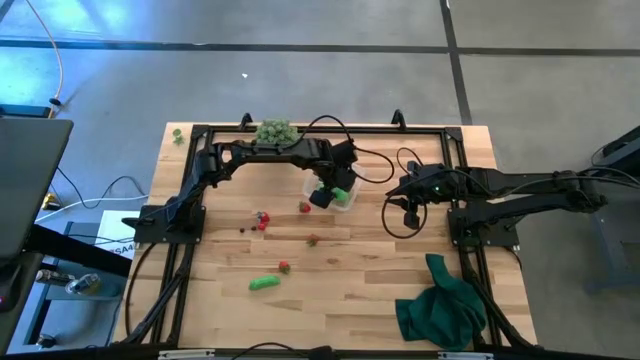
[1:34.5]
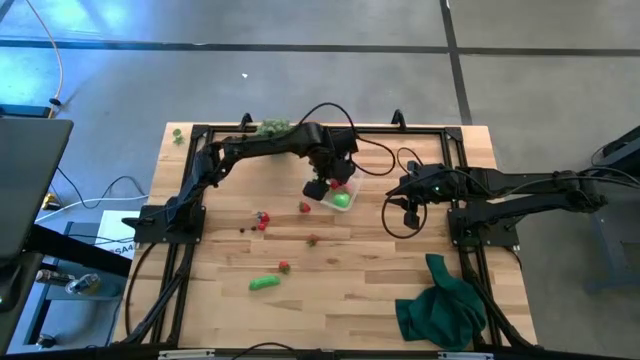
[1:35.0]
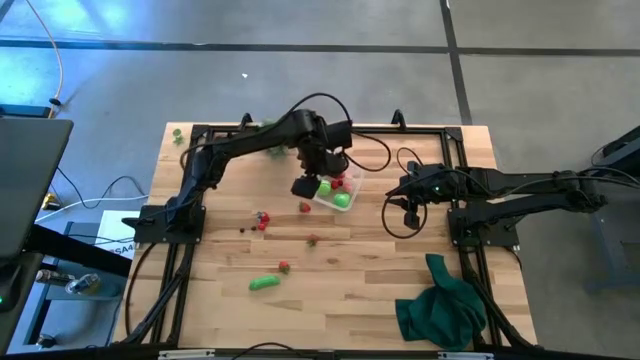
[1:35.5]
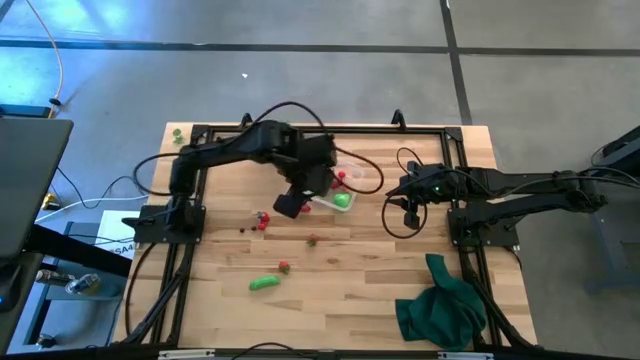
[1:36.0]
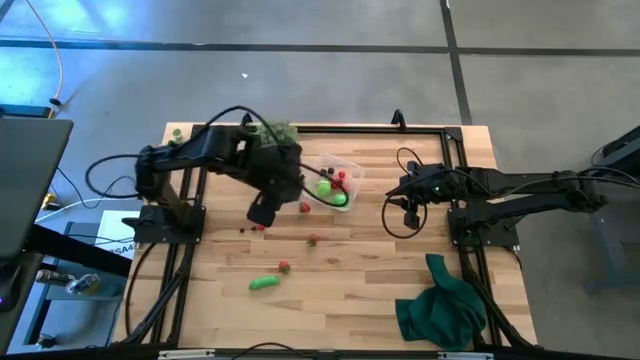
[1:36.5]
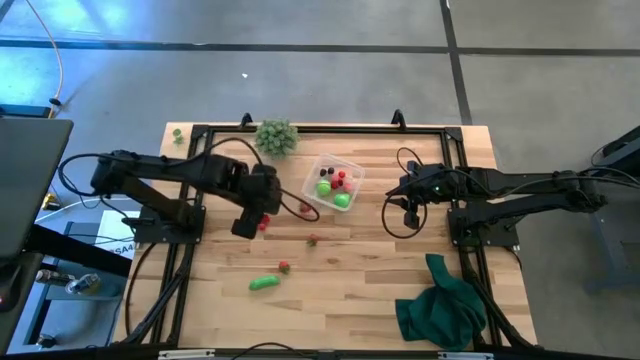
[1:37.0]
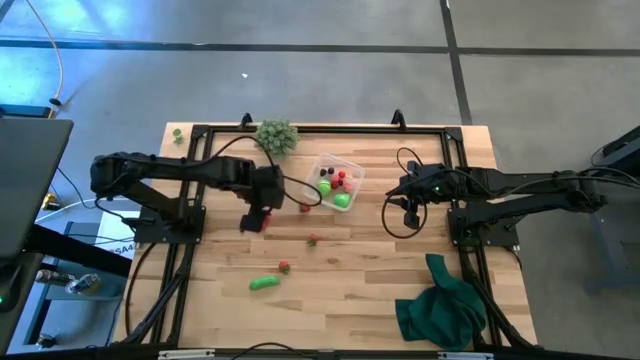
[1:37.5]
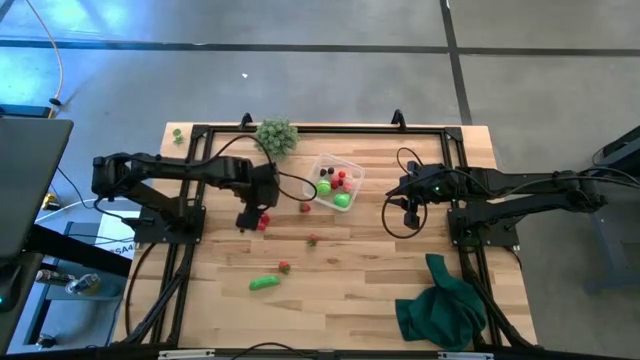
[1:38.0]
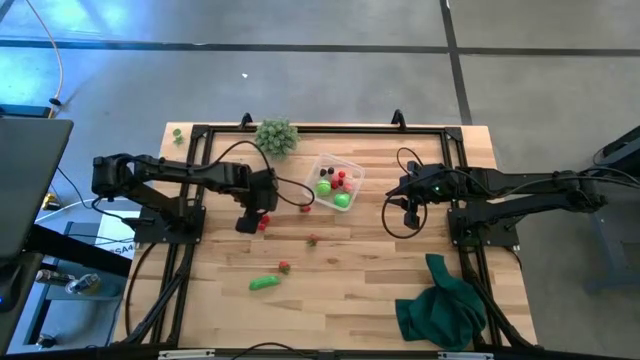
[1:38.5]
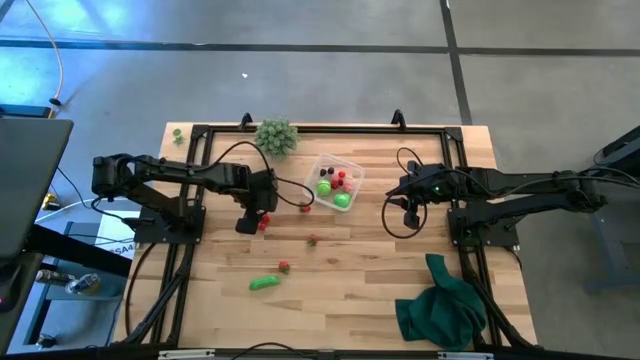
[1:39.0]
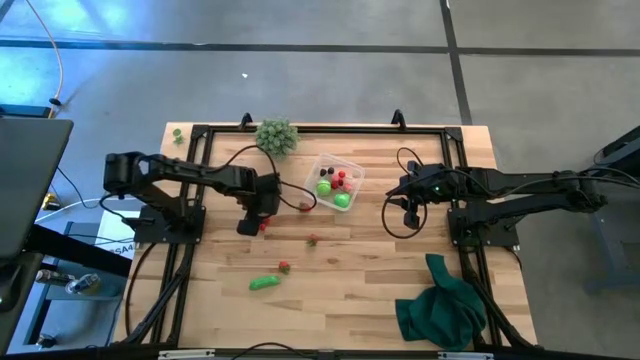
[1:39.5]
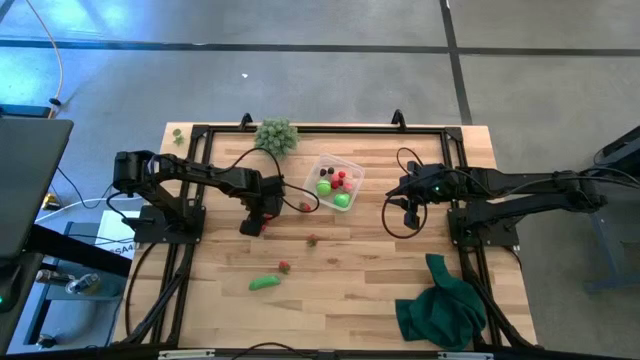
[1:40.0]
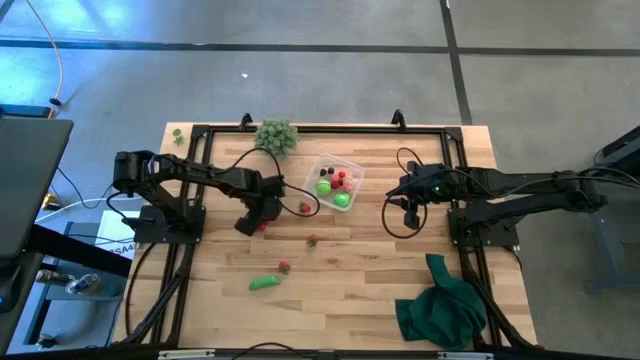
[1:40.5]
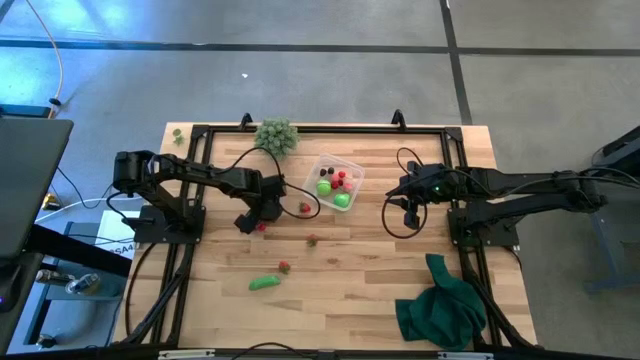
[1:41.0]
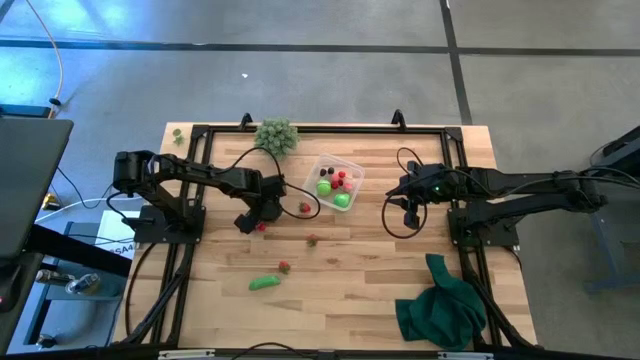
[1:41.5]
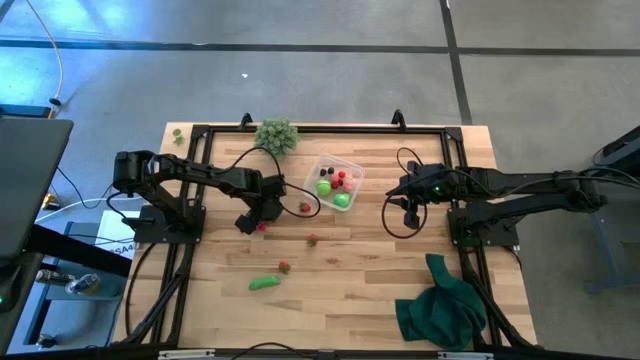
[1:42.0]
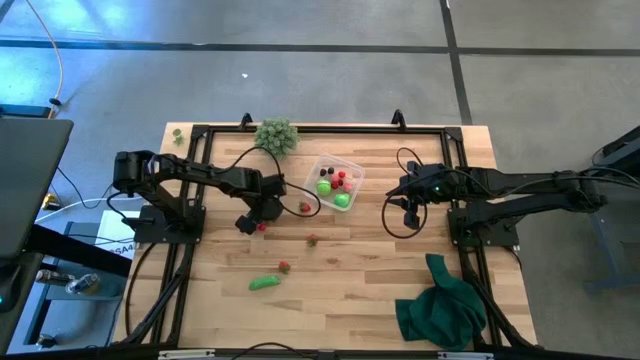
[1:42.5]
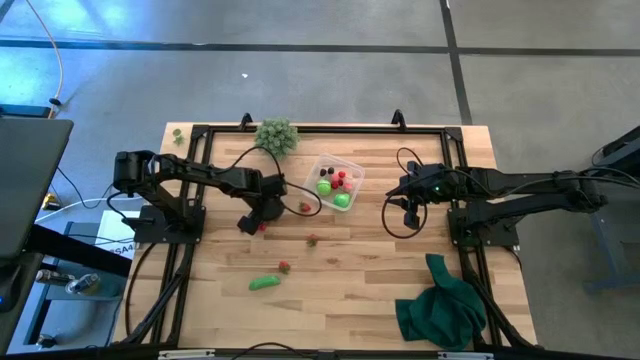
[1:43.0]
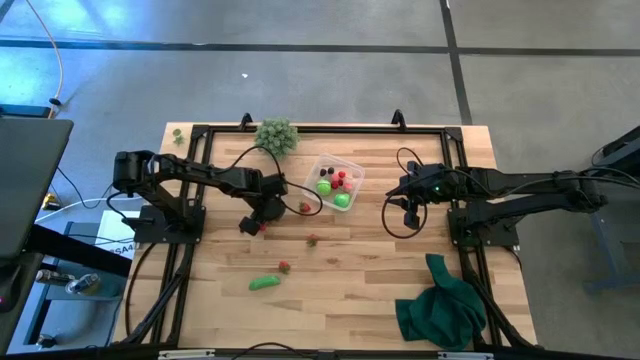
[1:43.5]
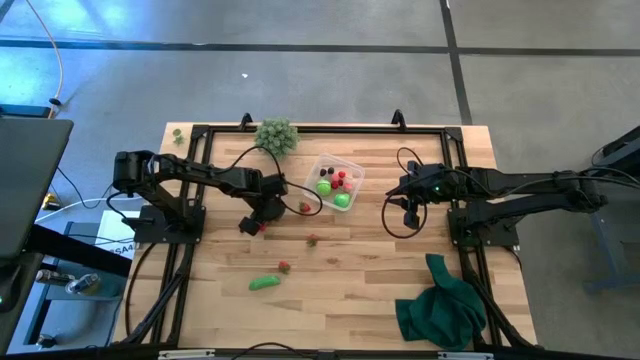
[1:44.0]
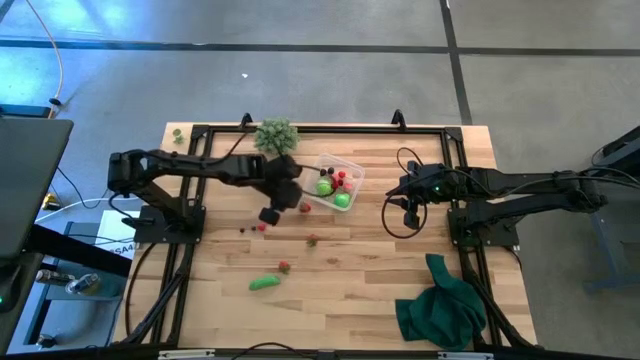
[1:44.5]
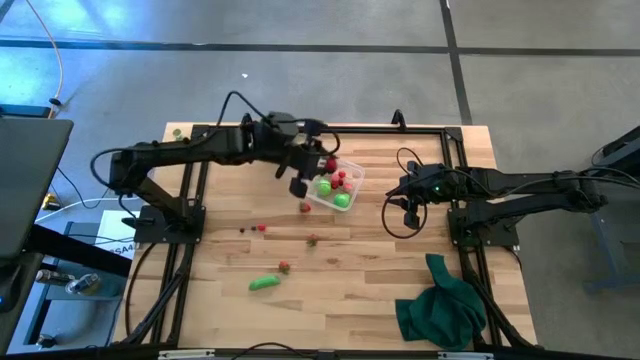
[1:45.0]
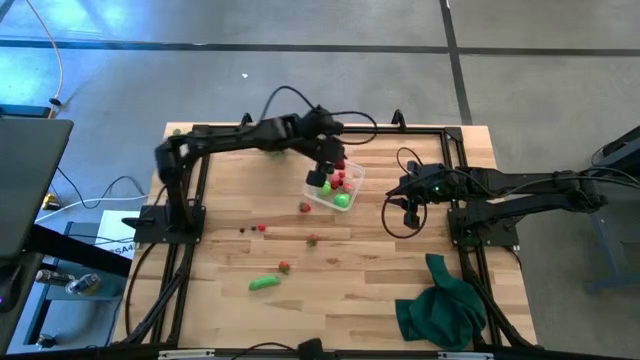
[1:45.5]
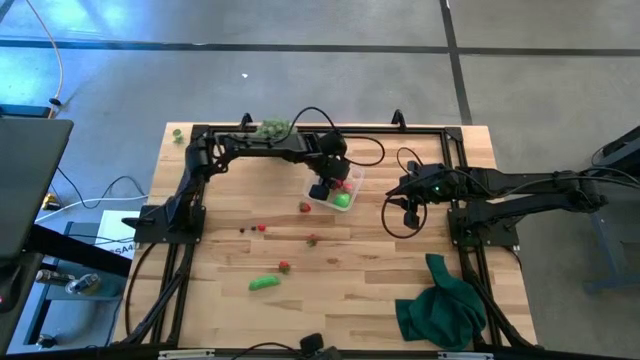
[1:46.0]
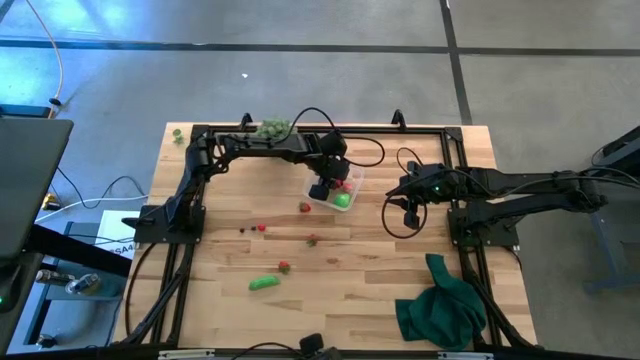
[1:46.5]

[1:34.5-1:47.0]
Task: Pick and placing Produce into tupperware
Put the strawberry into the transparent container

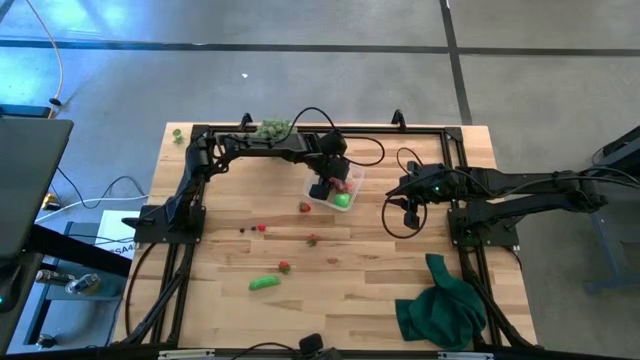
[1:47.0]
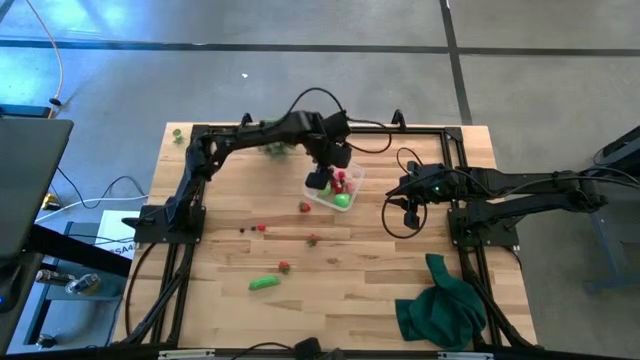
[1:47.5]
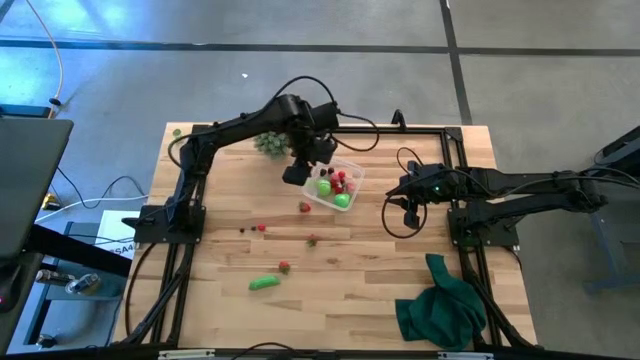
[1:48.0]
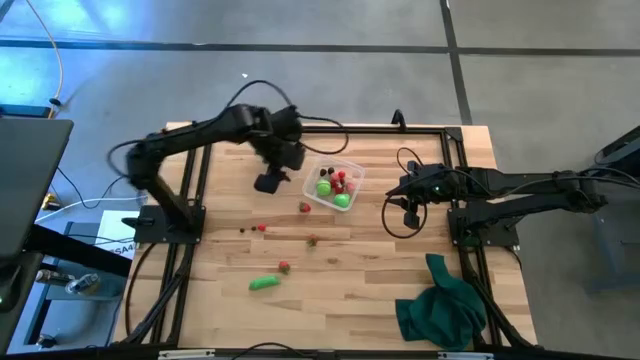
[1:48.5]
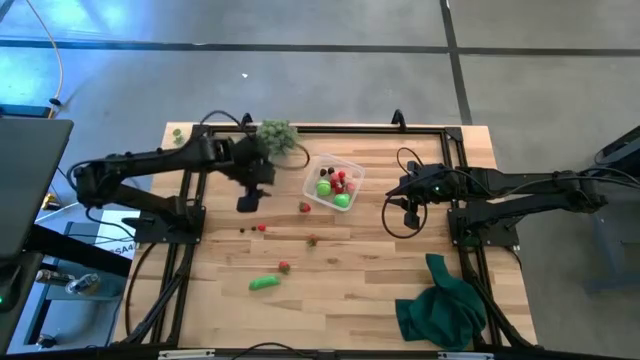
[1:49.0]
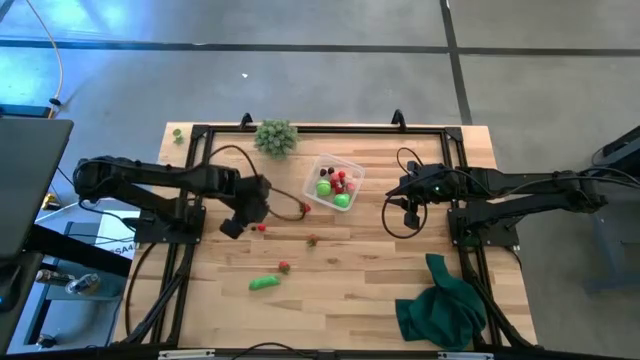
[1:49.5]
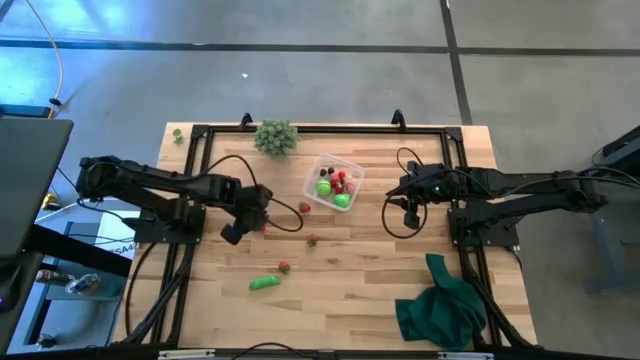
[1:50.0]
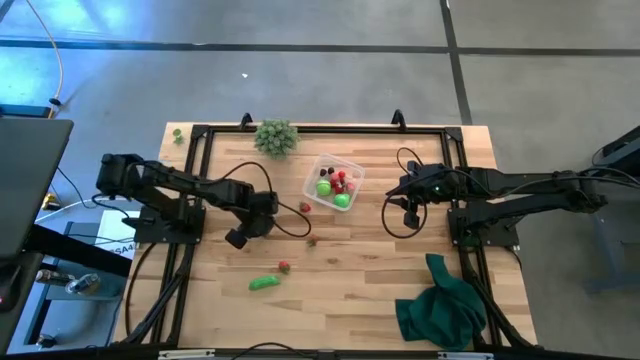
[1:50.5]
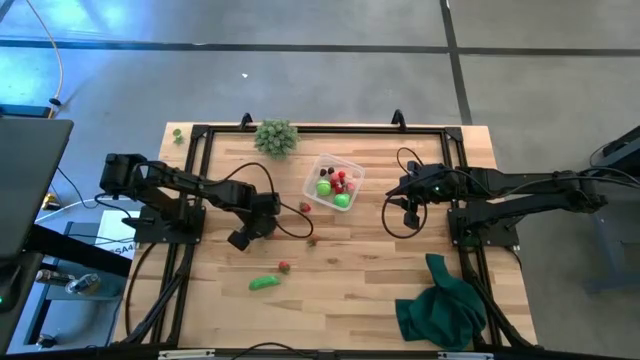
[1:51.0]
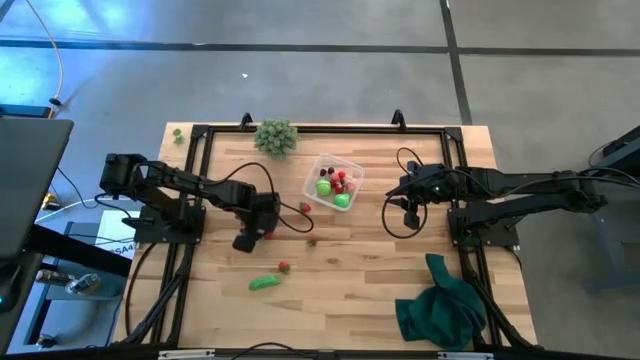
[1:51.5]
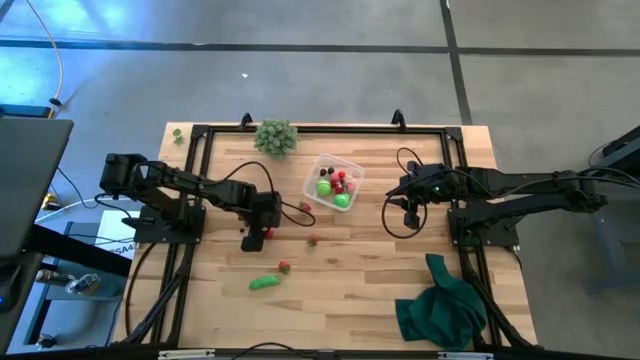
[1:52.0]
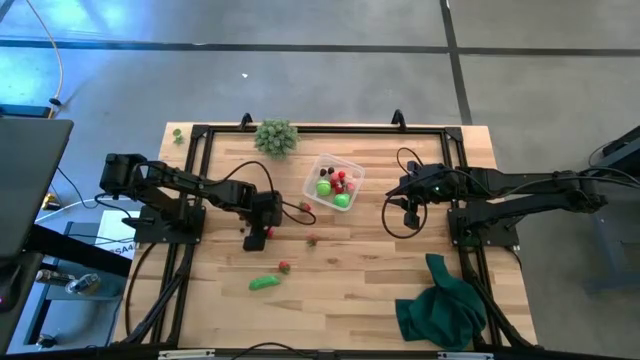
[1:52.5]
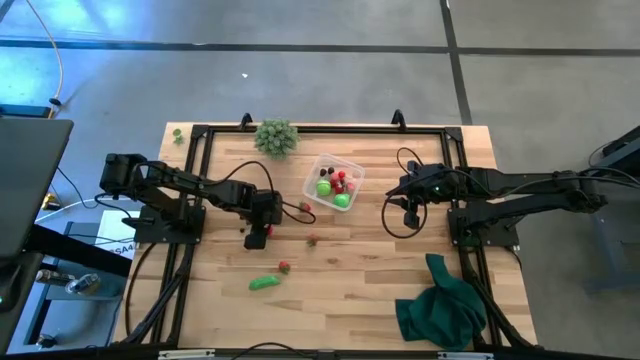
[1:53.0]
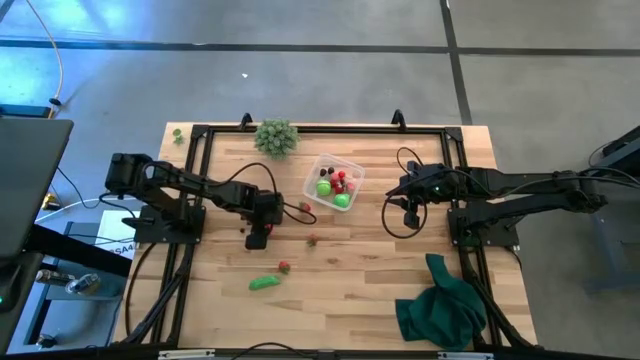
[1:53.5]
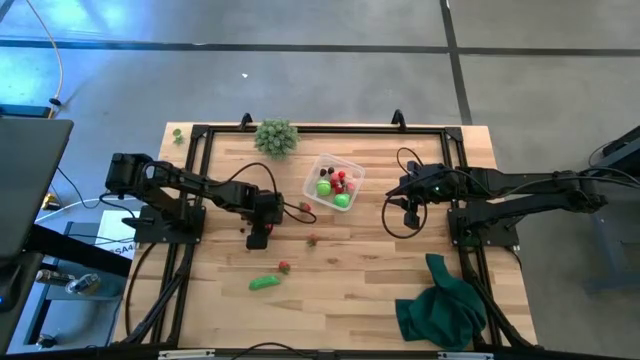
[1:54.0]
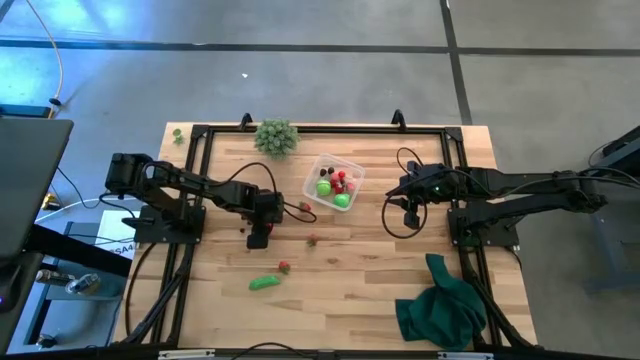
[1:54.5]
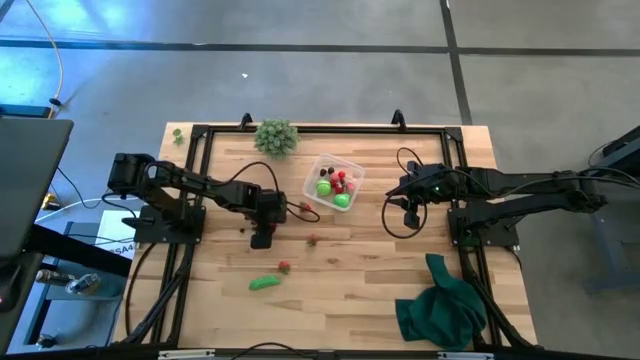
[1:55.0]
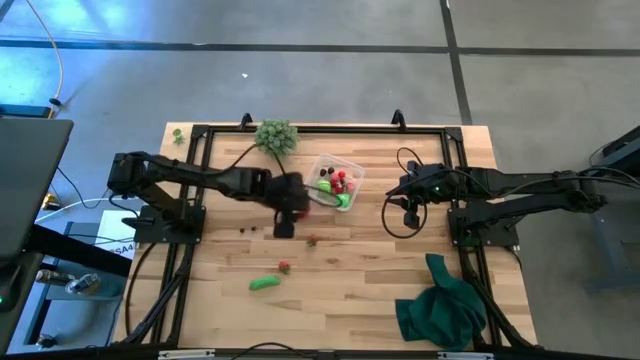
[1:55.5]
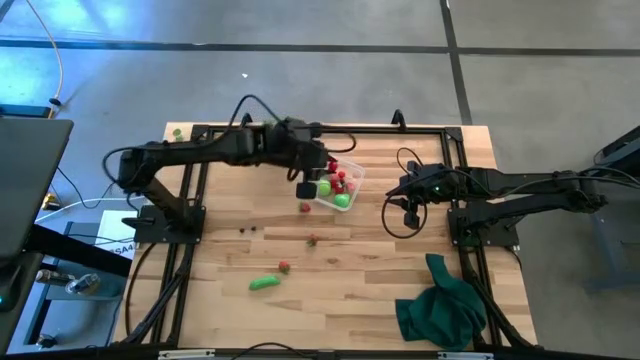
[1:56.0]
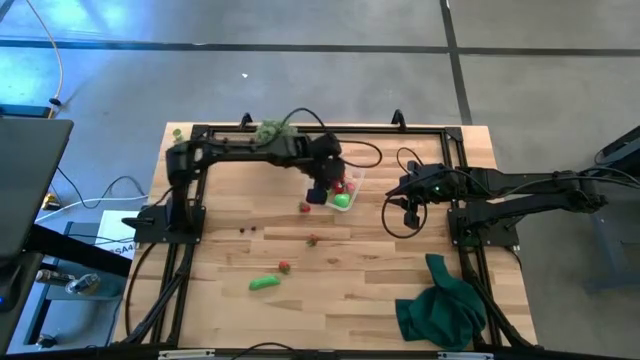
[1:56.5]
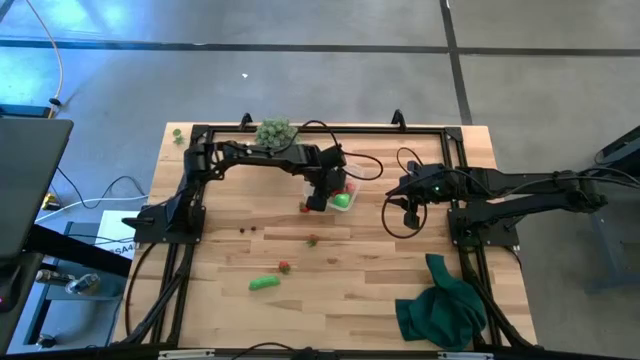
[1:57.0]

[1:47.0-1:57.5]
Put the red cherry into the transparent container
